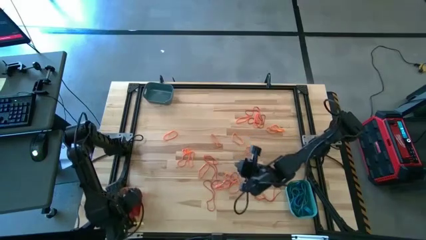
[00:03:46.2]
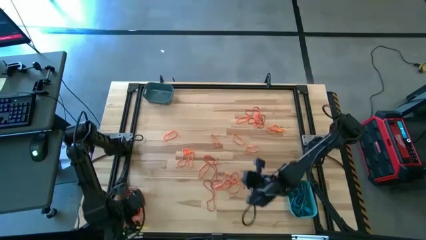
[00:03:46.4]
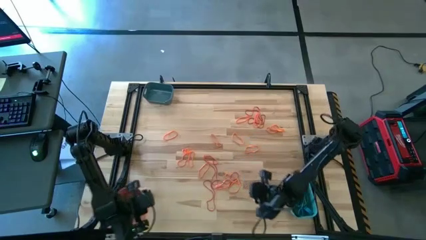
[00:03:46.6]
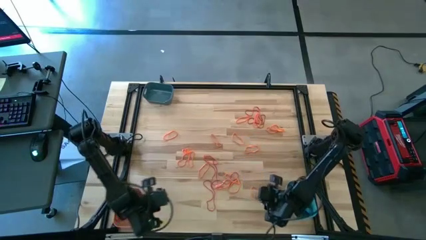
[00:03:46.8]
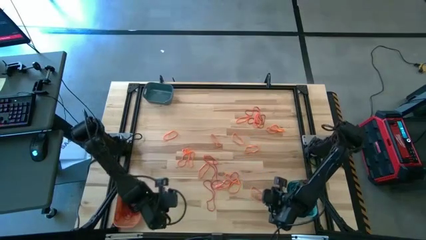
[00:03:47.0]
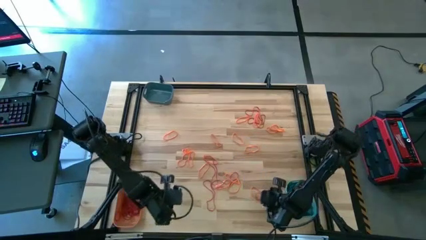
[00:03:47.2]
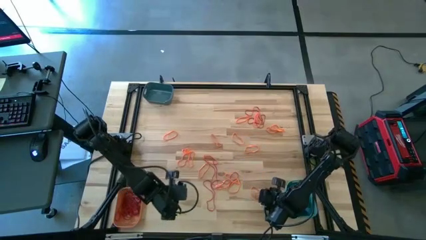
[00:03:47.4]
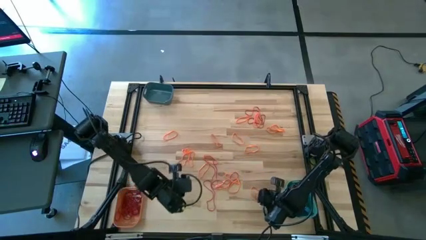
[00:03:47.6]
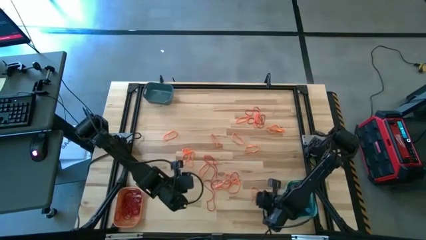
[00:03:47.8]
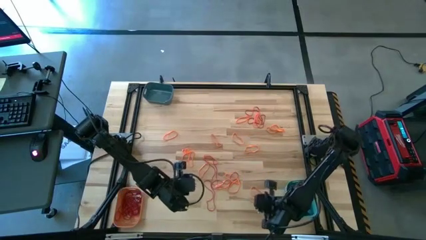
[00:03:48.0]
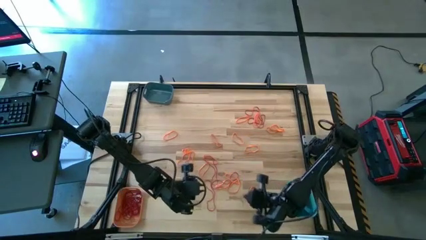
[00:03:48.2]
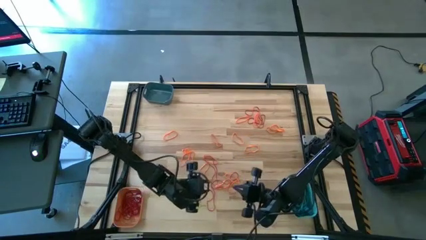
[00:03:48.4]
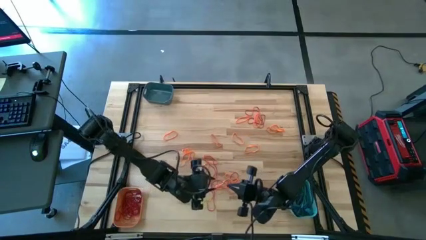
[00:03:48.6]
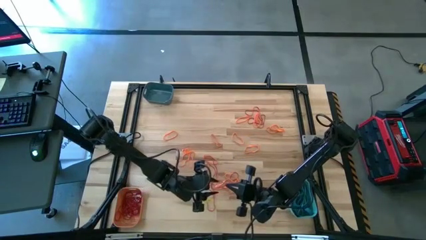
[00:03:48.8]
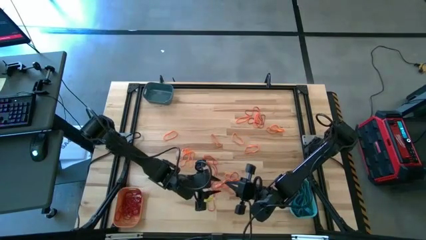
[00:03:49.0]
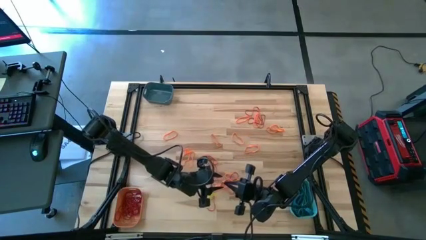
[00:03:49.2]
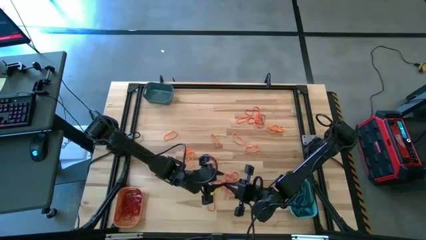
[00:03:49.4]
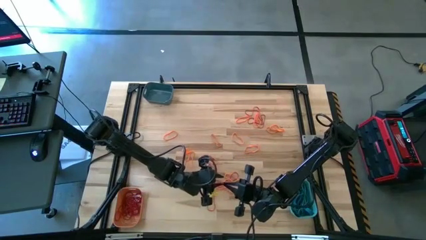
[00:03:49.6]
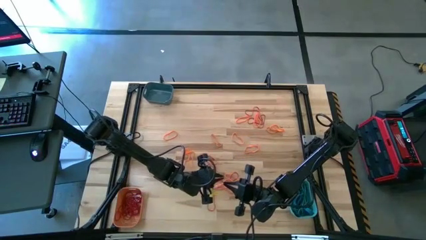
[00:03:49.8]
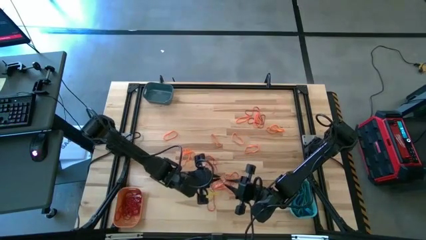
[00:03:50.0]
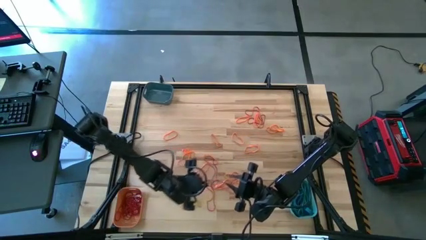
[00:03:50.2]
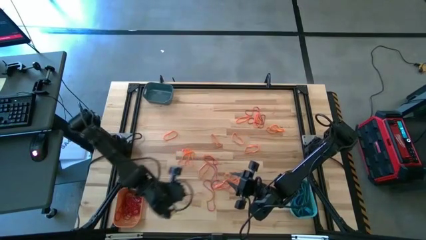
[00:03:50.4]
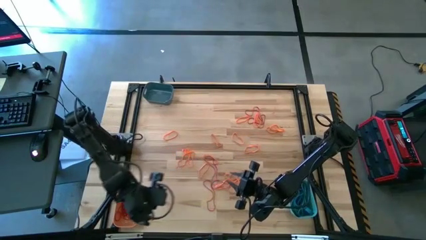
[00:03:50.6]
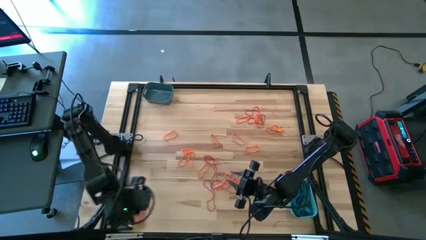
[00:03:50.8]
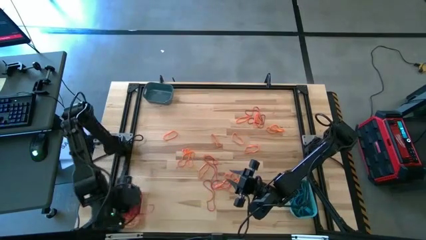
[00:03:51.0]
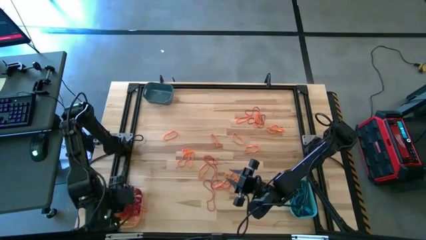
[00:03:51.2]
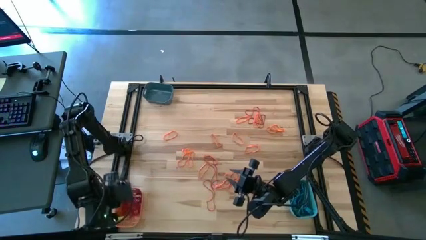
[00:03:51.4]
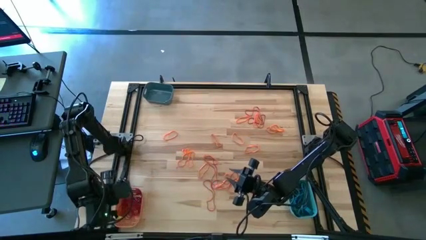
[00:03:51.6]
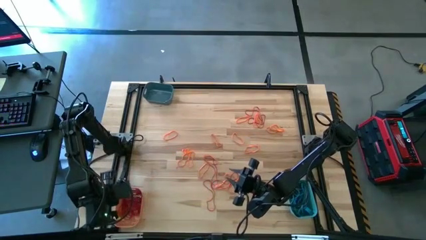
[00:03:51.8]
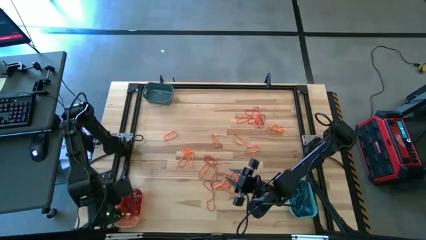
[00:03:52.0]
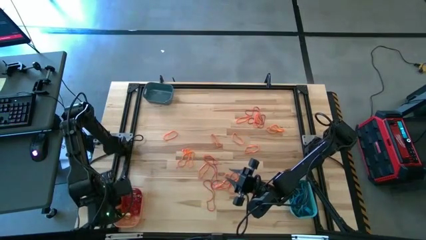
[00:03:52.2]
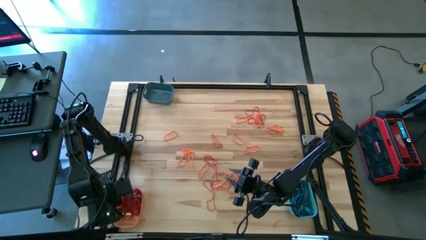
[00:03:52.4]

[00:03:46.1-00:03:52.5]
Task: Sort rubber bands into baskets
Put the red rubber band into the orange bin

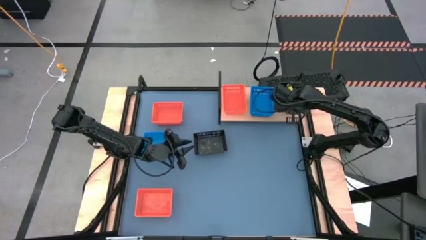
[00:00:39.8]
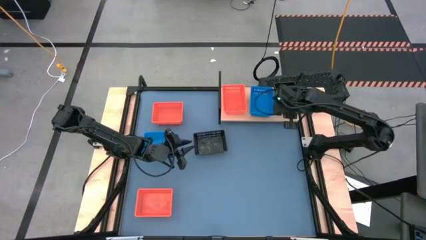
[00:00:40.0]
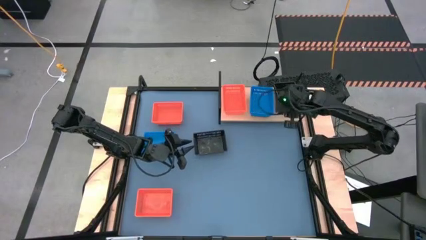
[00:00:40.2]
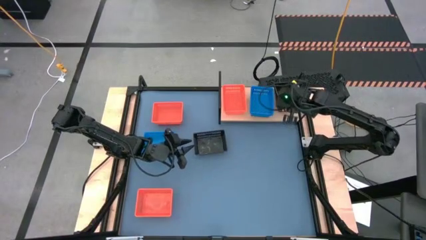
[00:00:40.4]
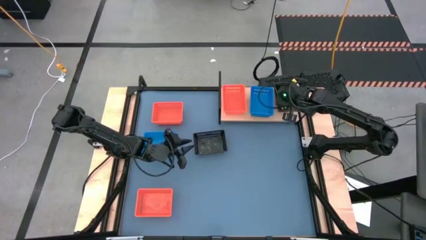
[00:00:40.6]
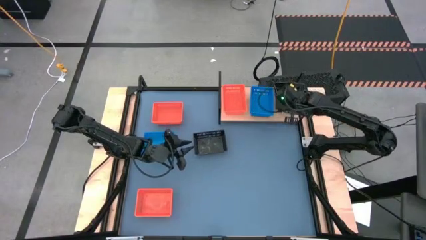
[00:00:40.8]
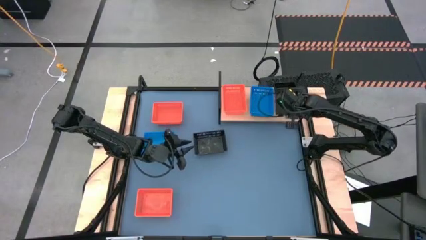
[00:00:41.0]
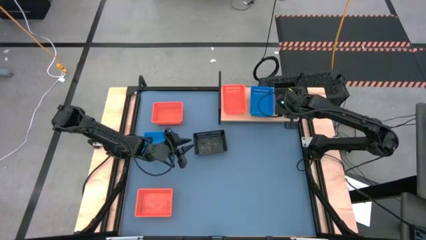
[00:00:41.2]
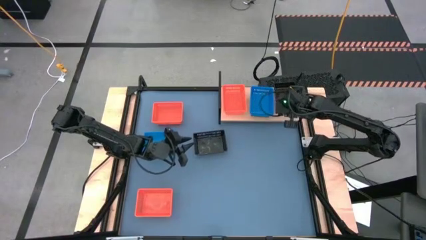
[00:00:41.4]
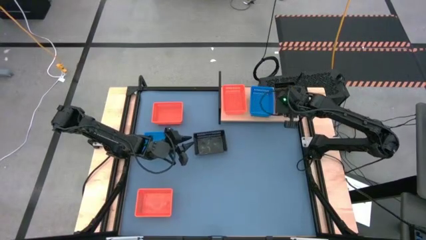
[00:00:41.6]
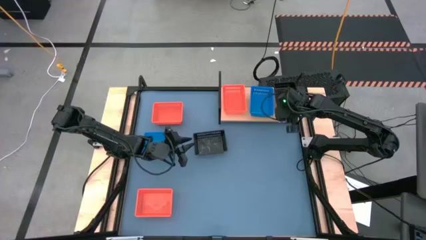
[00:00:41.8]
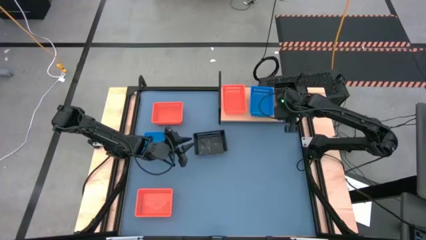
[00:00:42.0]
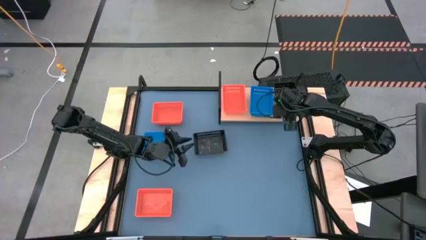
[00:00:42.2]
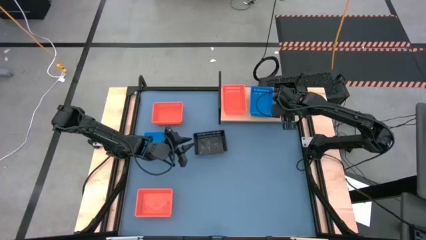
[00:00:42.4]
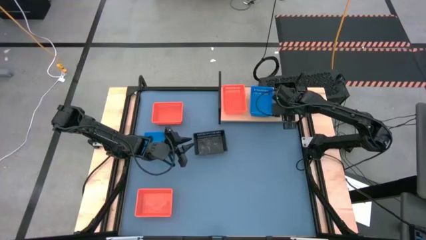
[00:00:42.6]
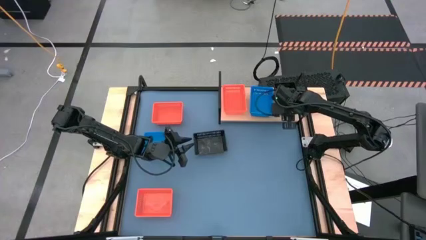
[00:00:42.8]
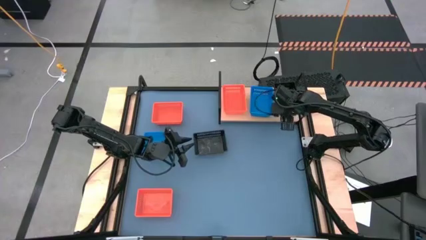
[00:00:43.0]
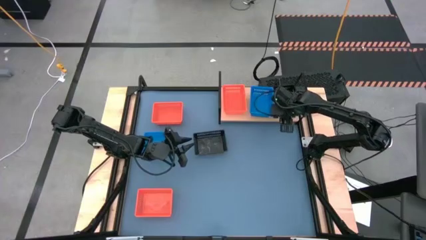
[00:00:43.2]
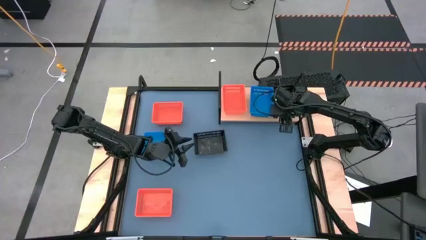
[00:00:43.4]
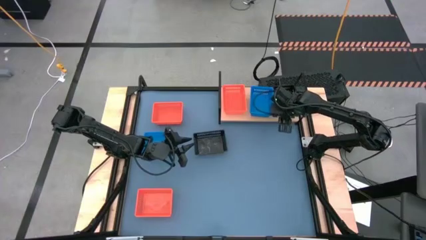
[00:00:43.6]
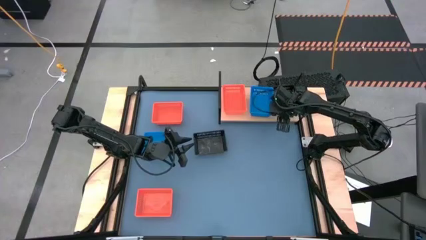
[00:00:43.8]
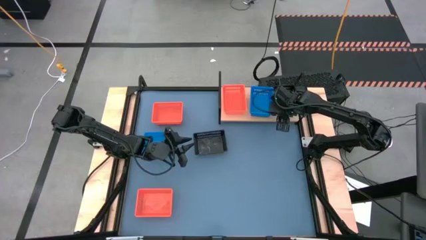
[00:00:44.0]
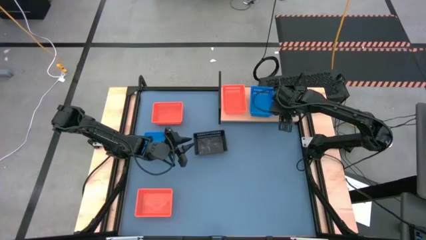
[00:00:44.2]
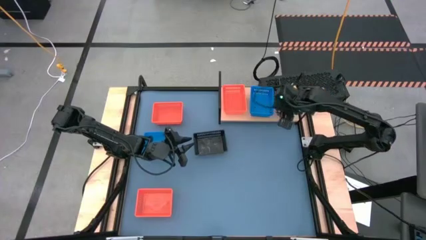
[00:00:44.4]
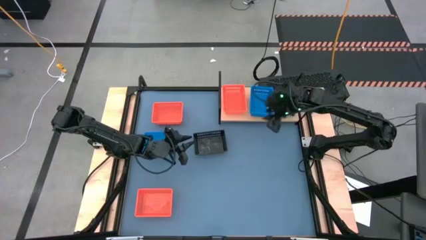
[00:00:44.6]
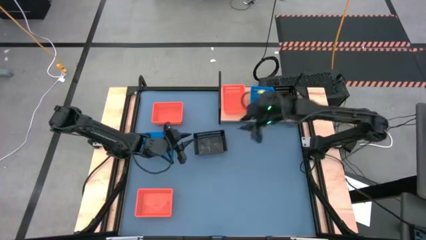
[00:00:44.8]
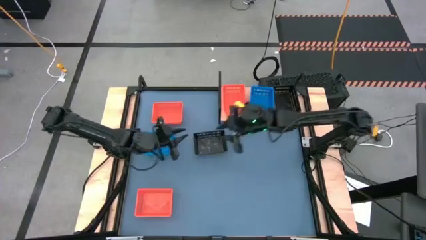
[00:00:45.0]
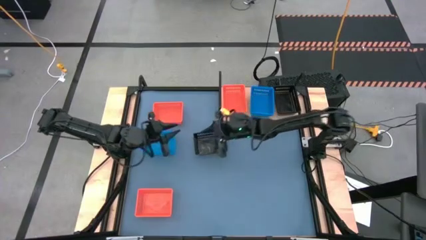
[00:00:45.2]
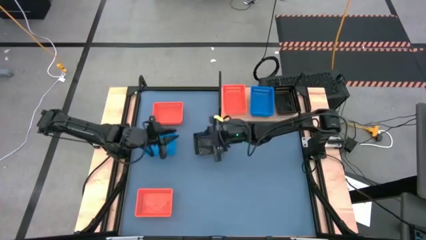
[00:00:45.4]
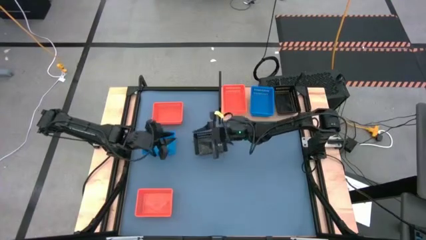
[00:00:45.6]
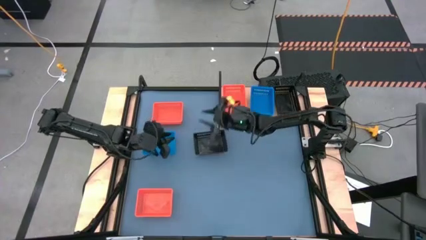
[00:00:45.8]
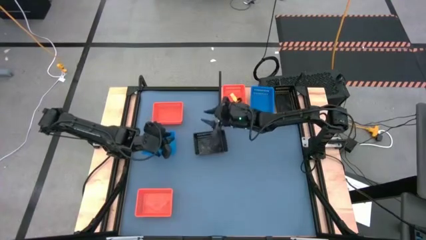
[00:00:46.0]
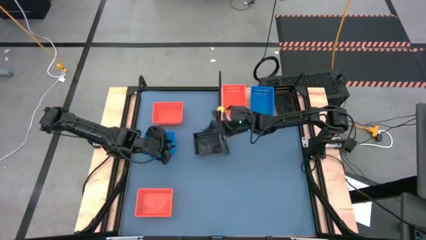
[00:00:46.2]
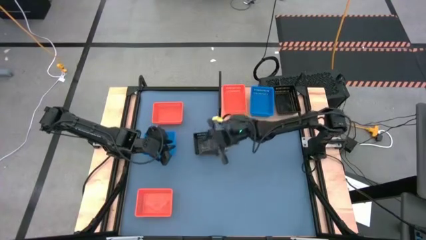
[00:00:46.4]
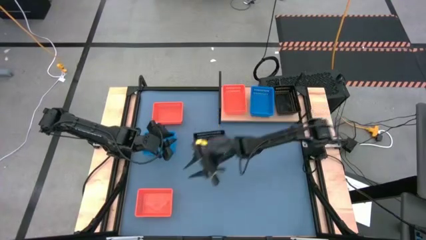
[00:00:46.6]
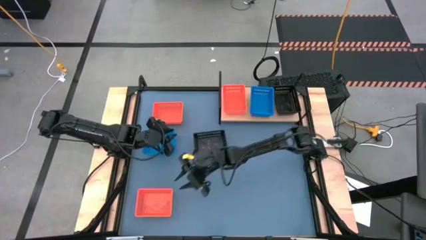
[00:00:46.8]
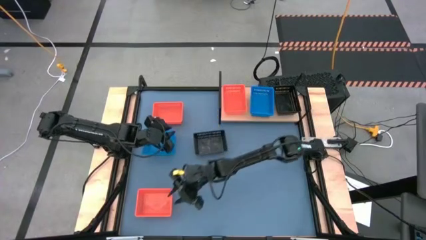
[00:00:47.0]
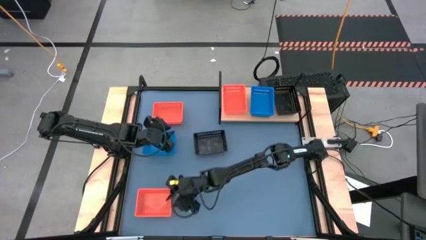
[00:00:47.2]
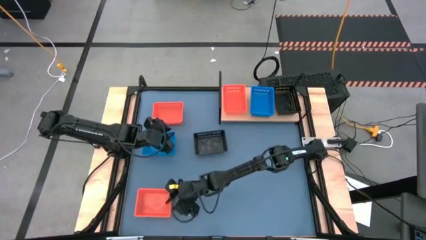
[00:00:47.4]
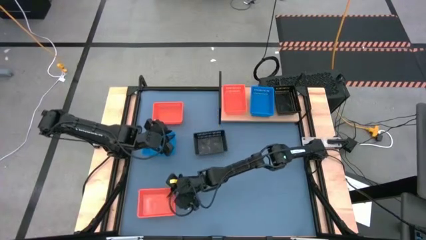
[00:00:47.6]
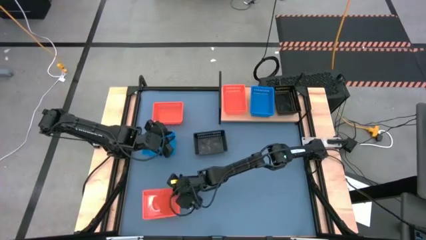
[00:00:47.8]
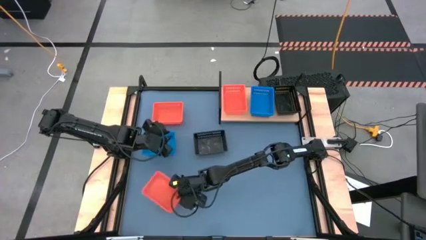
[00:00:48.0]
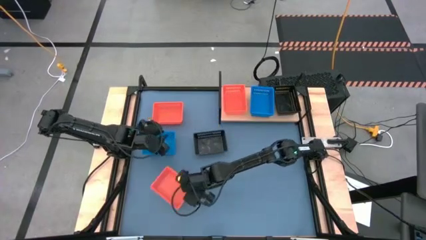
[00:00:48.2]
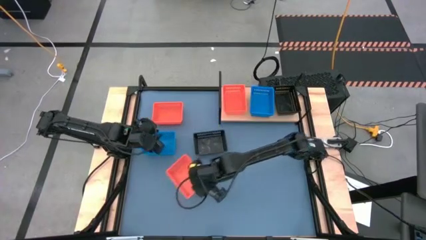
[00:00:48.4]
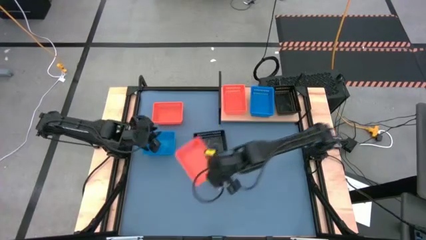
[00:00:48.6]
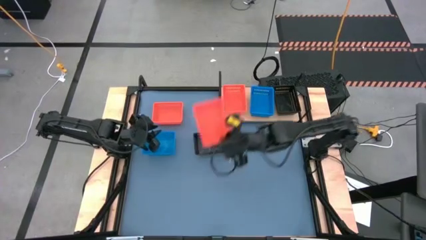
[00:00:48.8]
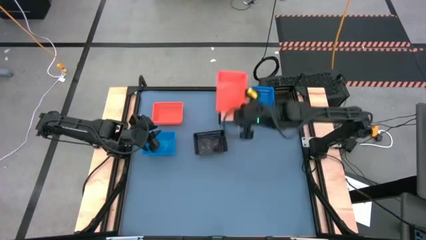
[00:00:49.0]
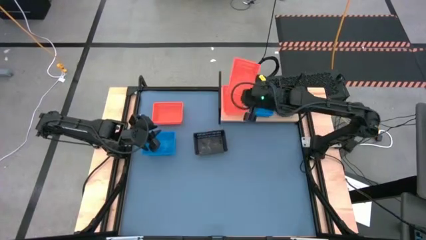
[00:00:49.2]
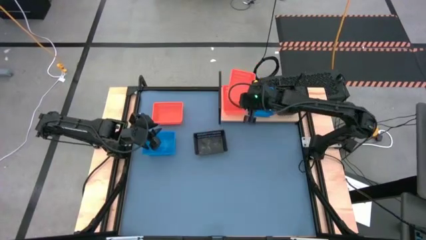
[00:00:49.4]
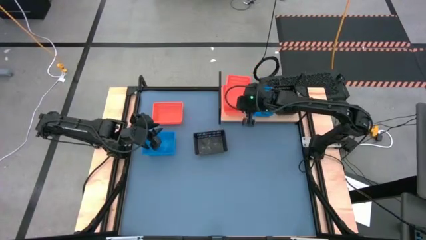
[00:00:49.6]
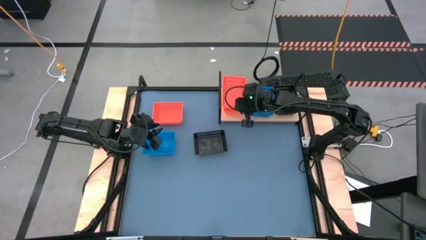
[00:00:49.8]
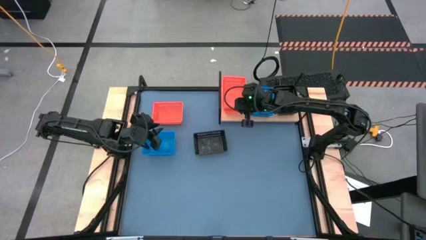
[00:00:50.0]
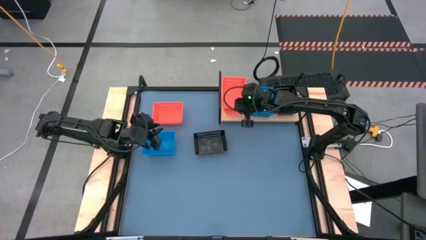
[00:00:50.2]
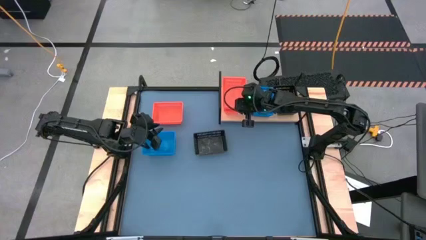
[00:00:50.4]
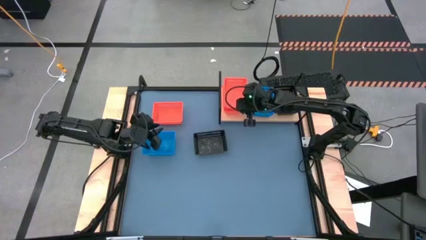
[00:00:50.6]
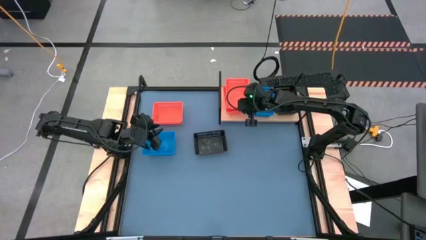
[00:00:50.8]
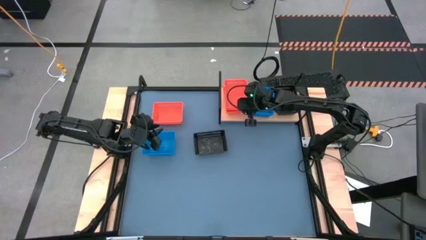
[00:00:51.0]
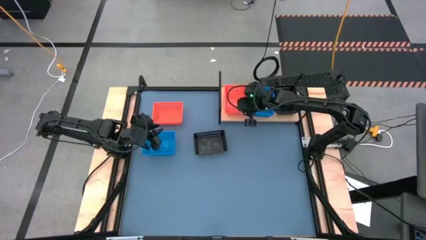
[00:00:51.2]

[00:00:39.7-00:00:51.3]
Task: Stack baskets on shelf by color
Put the bottom orange basket on the shelf
